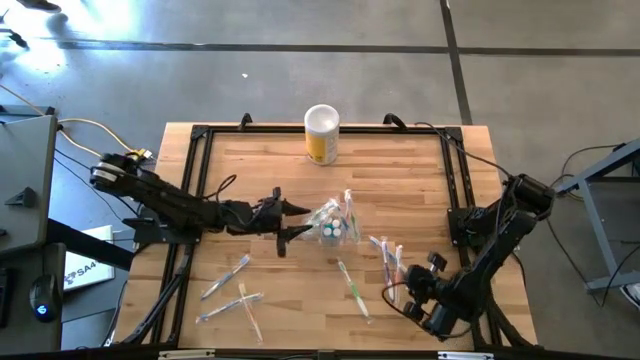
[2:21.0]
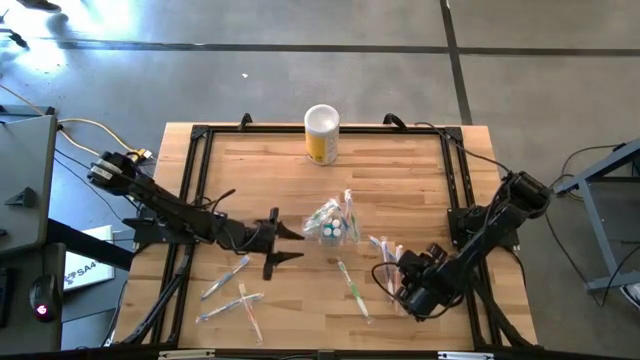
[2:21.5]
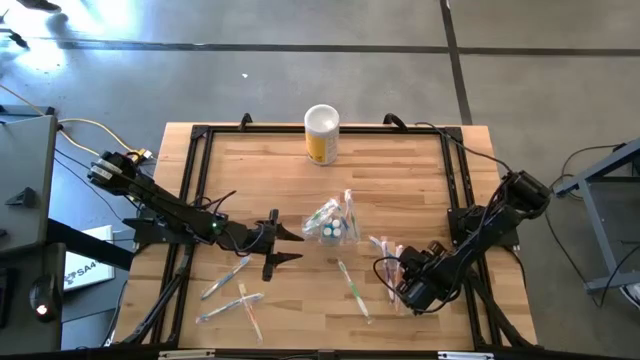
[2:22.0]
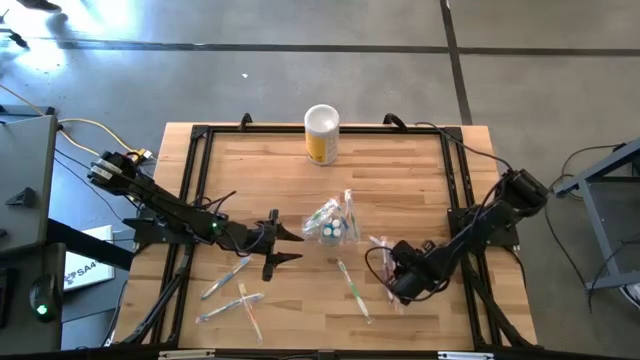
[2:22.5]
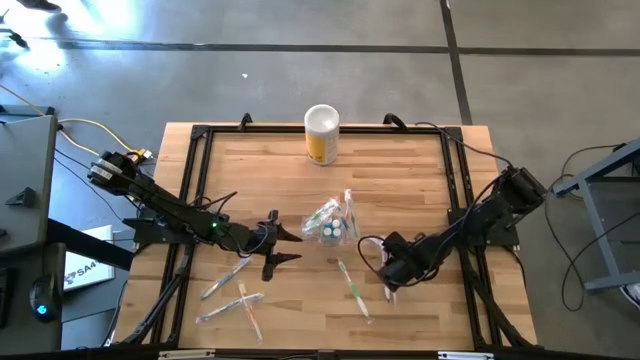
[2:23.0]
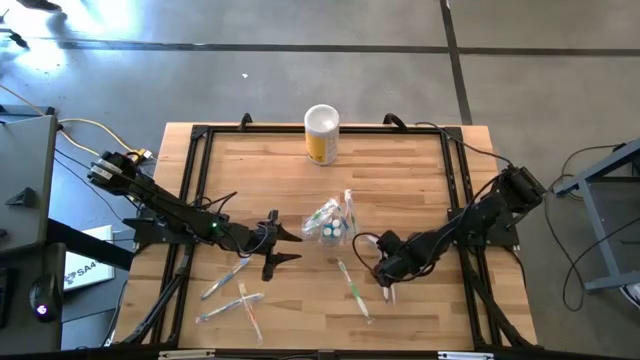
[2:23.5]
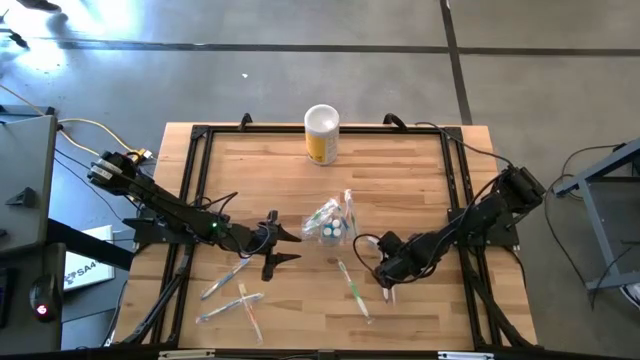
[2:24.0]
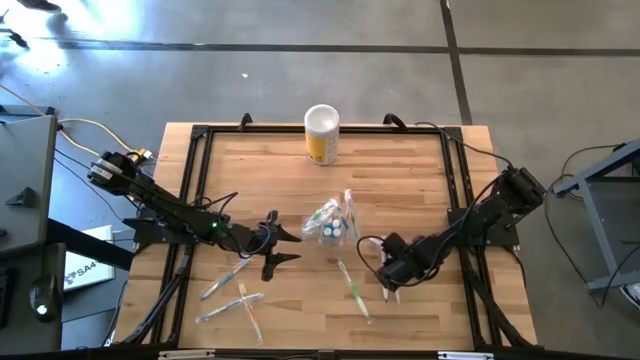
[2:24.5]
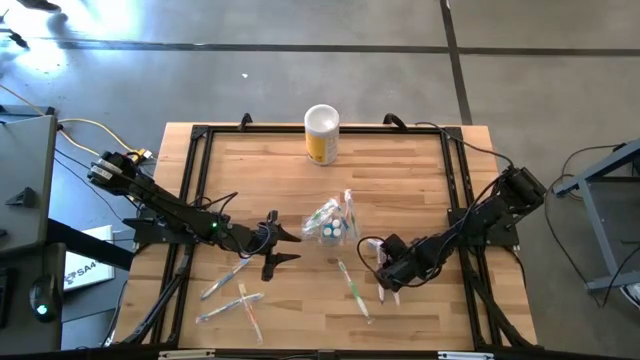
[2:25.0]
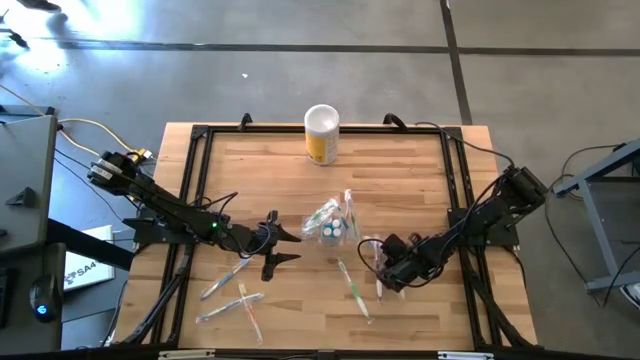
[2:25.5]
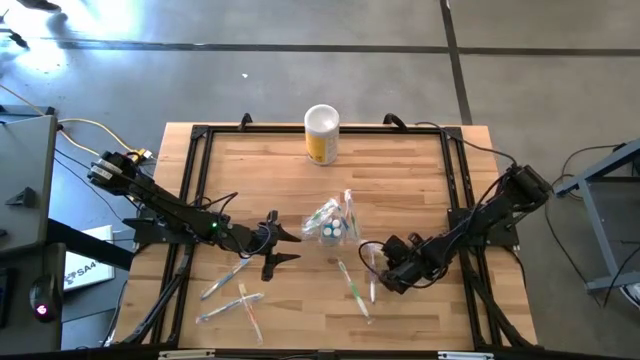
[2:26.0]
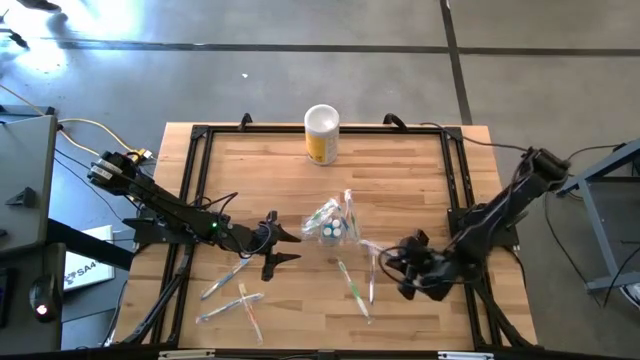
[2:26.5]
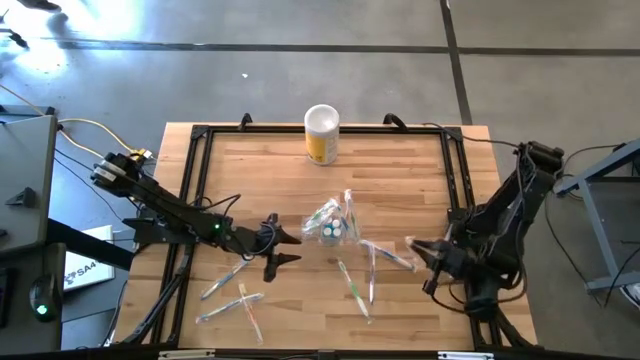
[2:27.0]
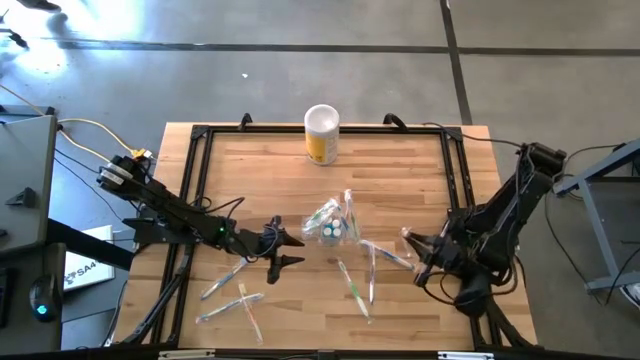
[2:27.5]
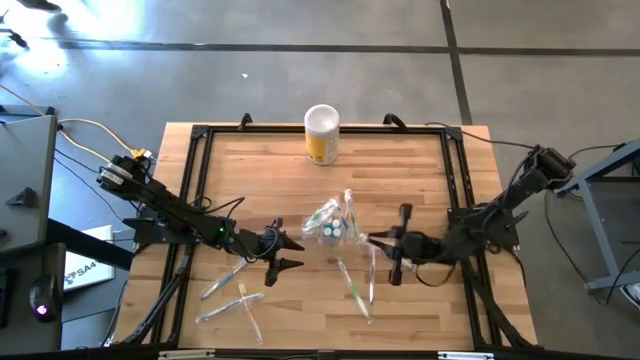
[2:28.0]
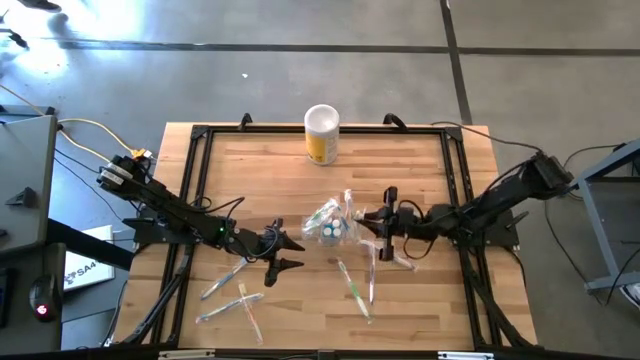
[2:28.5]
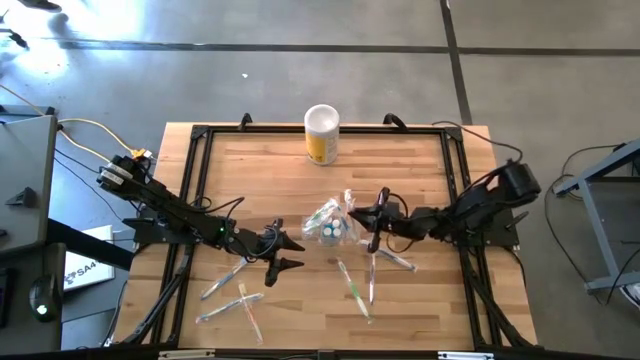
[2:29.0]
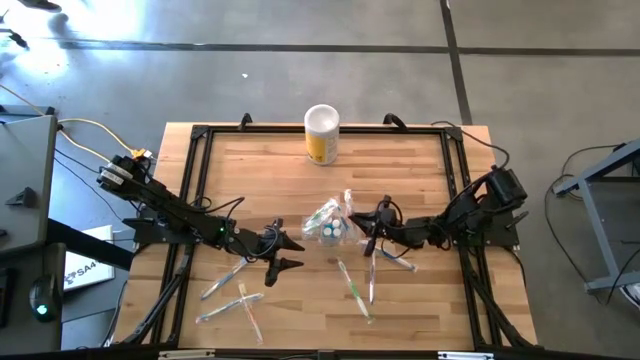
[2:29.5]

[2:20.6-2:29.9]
Task: Pick & Place toothbrushing station
Put the orange toothbrush into the right part of the transparent organizer

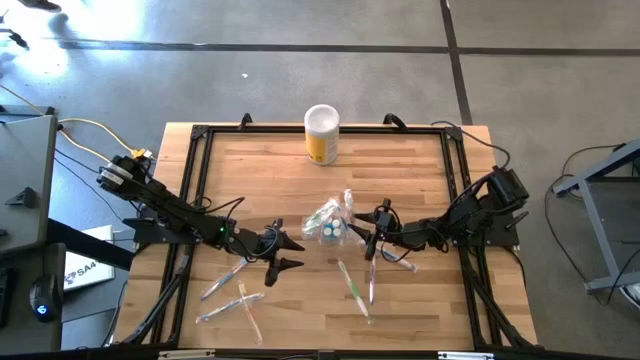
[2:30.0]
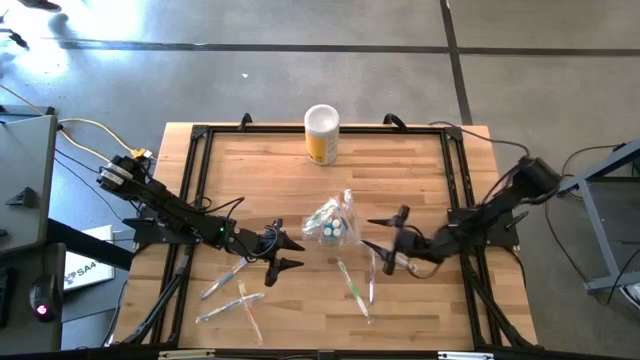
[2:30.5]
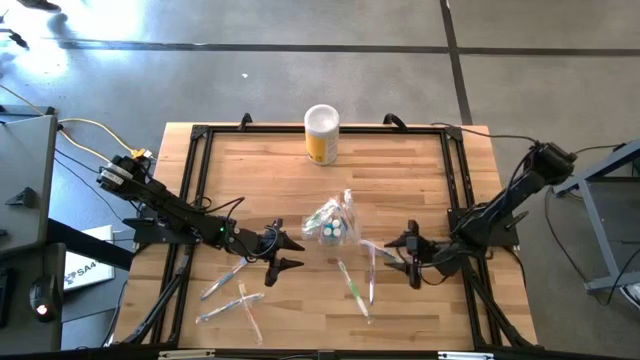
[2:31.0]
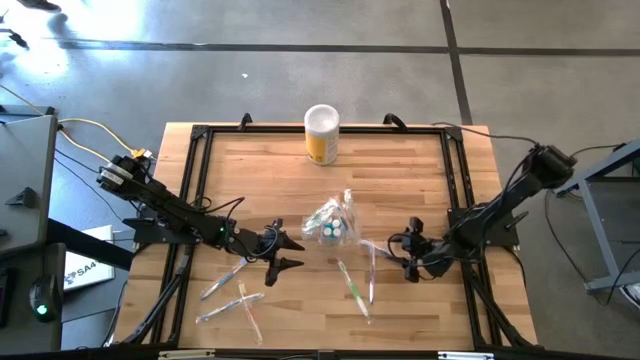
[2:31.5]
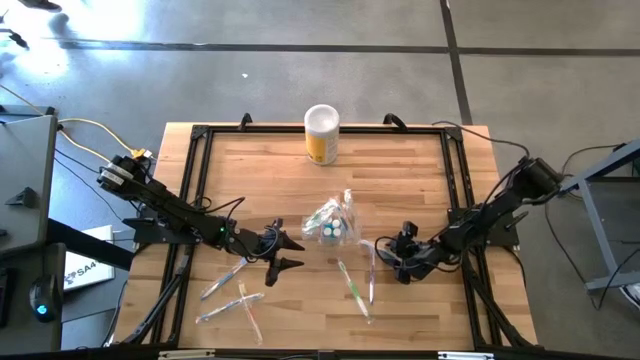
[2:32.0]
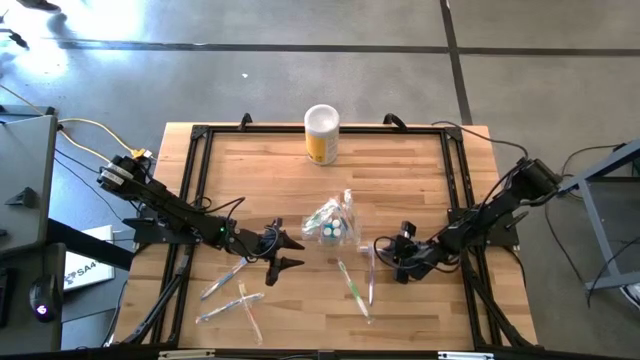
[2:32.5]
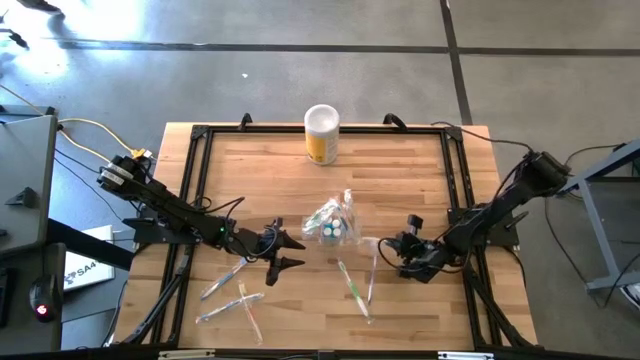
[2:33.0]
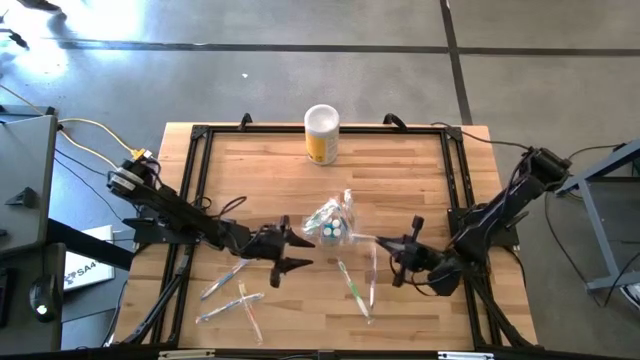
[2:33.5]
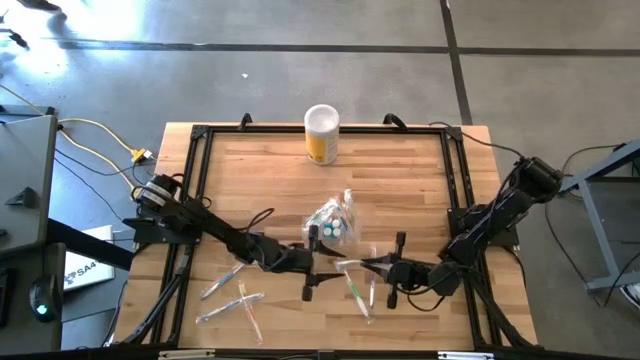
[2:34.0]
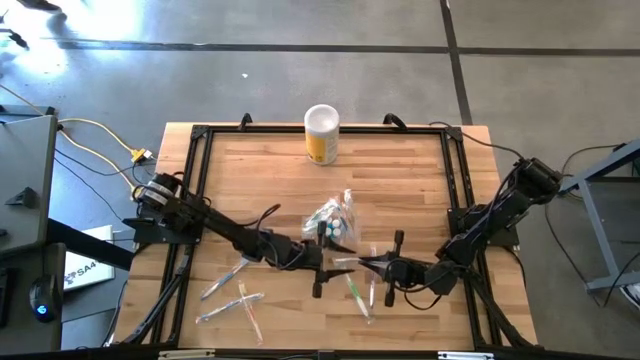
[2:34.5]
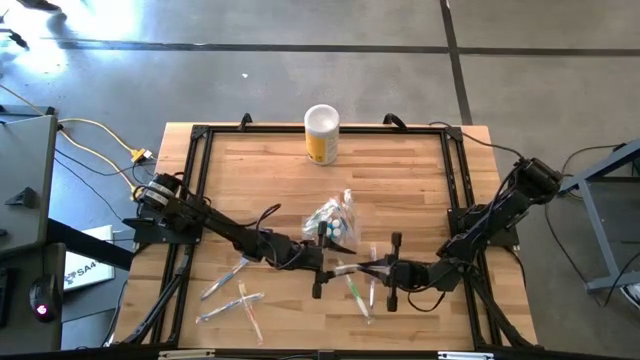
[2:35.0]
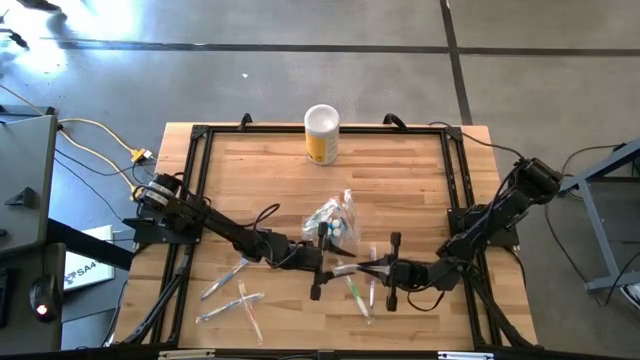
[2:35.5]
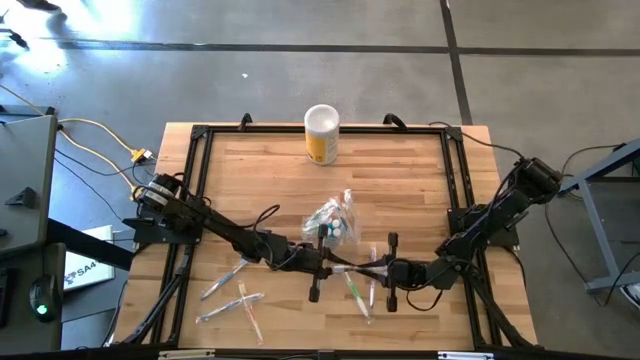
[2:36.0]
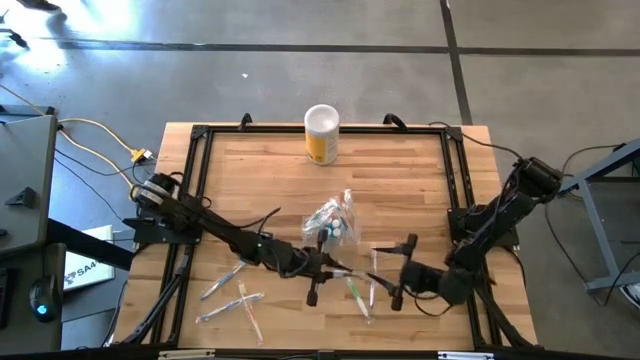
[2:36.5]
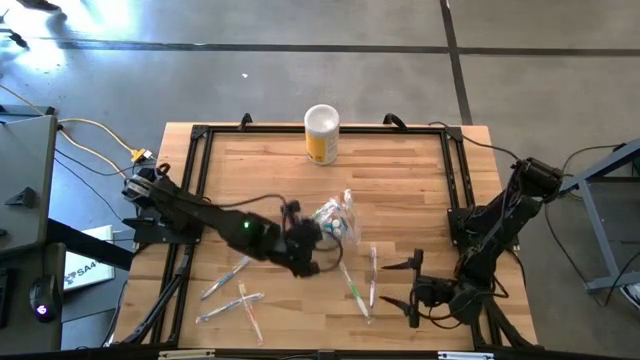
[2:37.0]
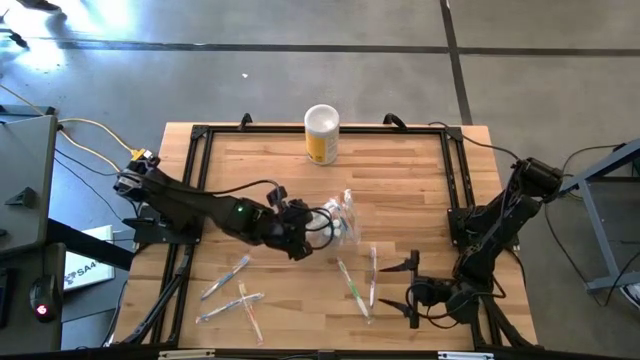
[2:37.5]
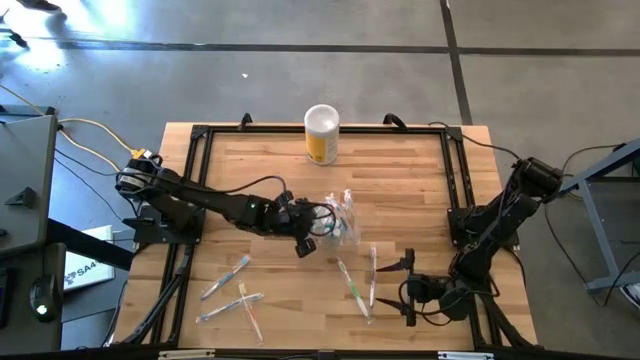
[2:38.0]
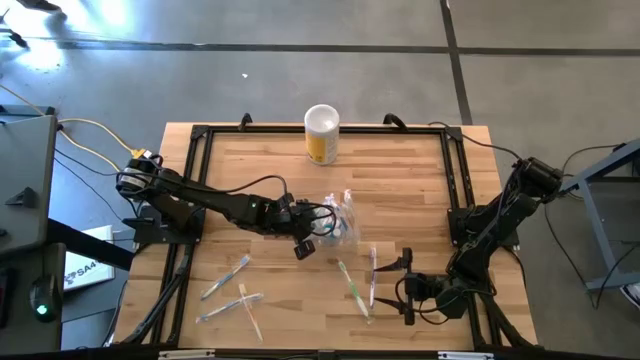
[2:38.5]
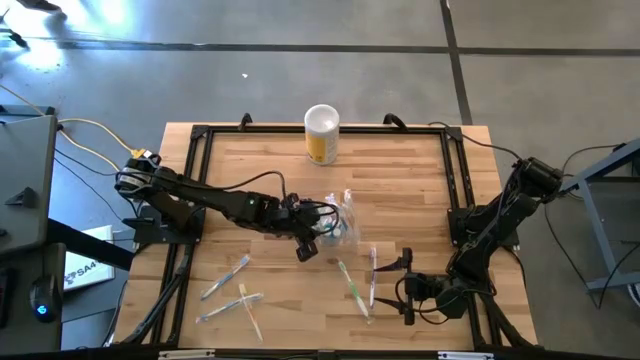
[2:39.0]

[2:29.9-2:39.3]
Put the blue toothbrush into the left part of the transparent organizer

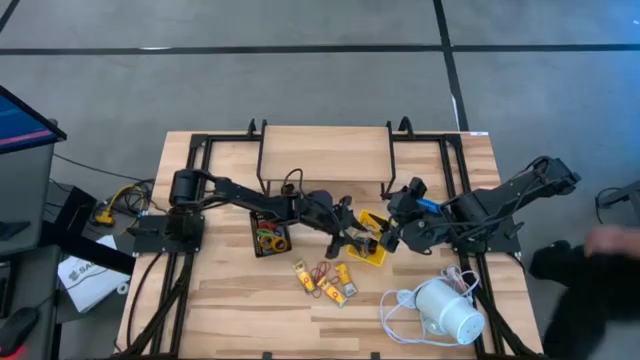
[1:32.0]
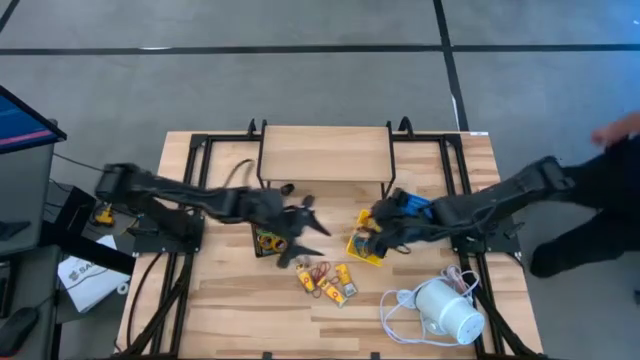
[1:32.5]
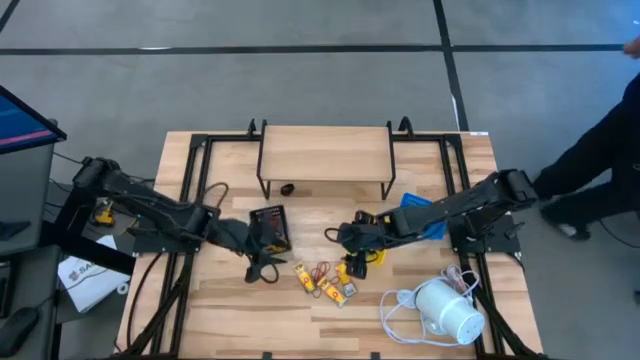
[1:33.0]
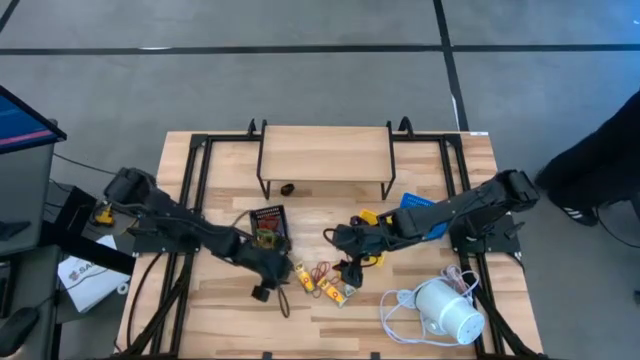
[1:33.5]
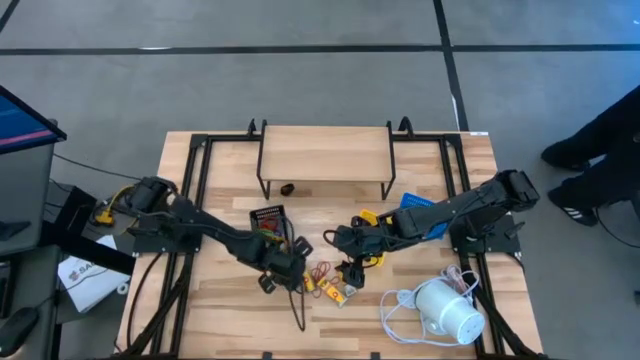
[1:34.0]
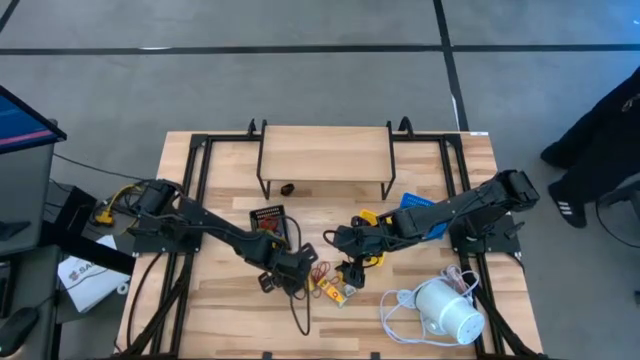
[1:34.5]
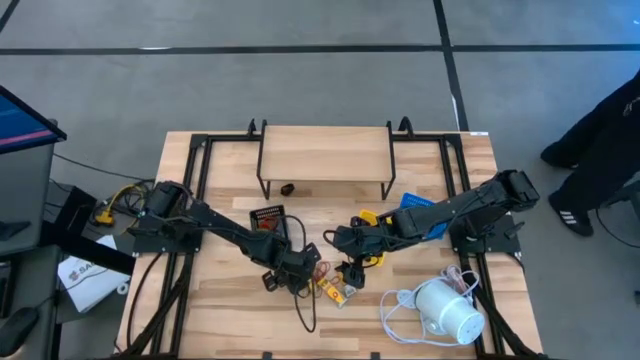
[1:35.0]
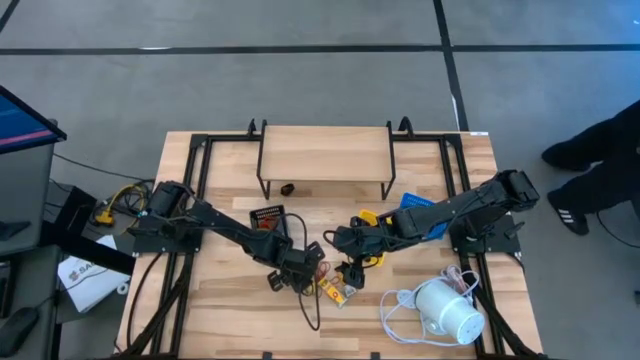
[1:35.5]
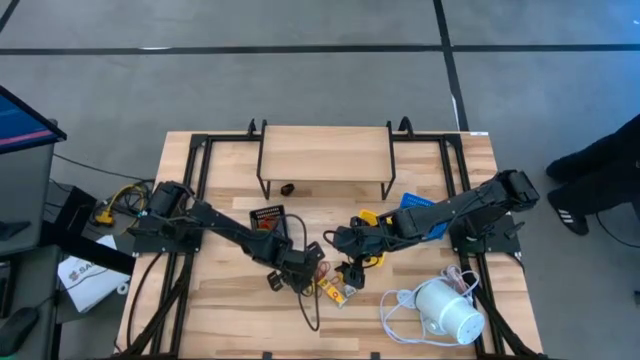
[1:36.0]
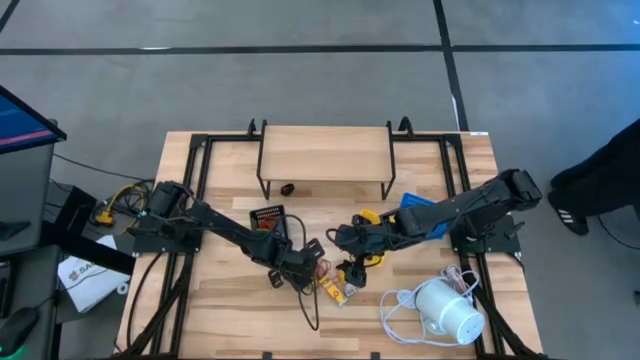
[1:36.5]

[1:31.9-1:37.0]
Task: Pick & Place Office Desk Supplies
Put the yellow crayon box into the blue bin
